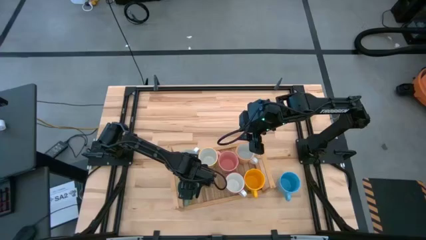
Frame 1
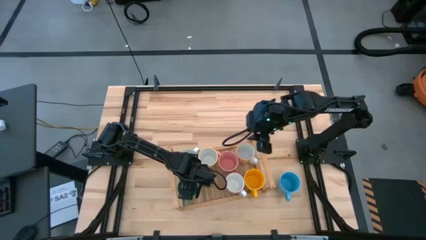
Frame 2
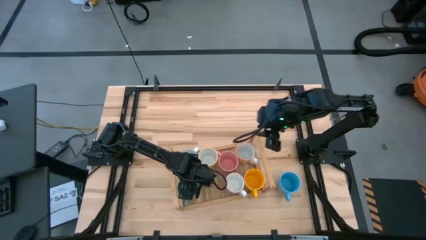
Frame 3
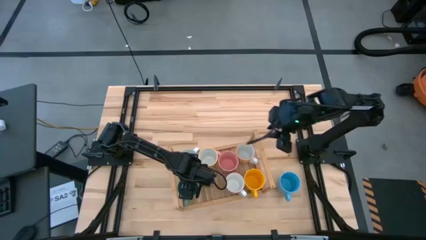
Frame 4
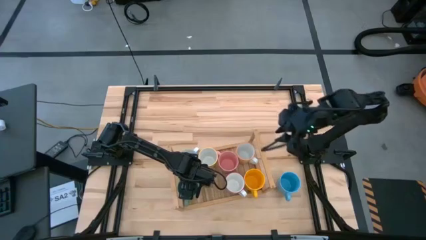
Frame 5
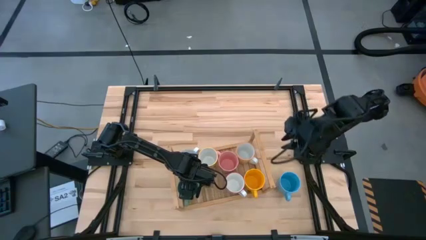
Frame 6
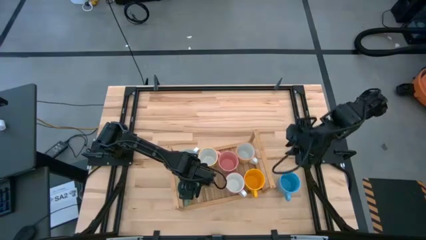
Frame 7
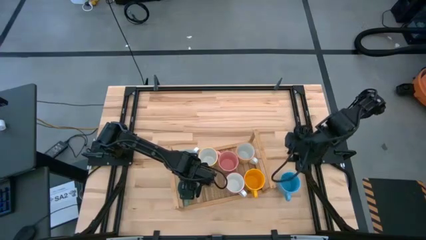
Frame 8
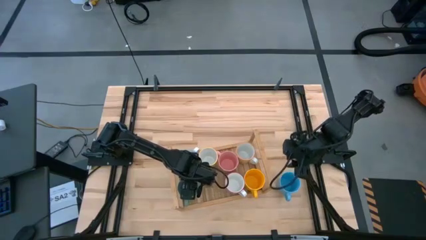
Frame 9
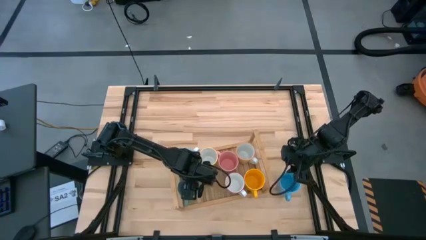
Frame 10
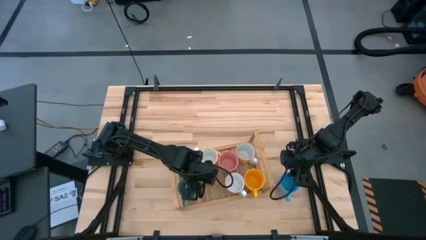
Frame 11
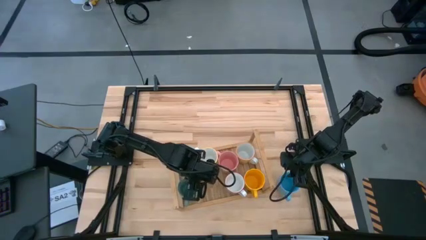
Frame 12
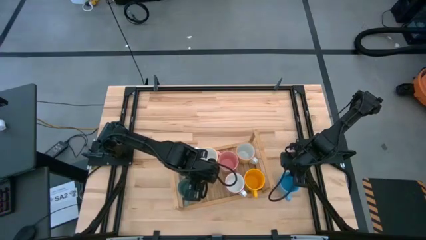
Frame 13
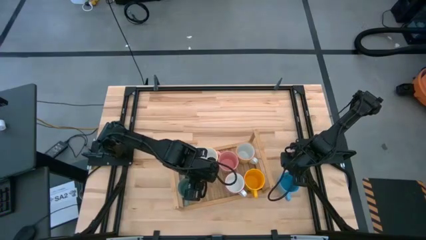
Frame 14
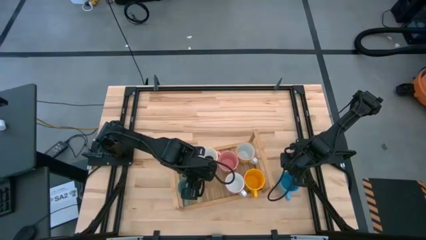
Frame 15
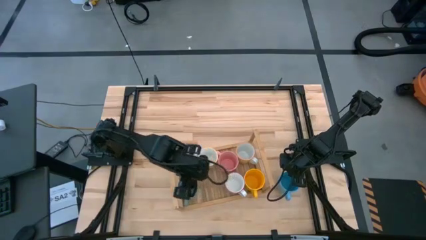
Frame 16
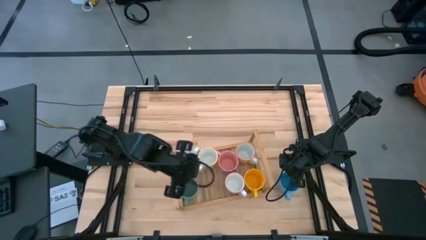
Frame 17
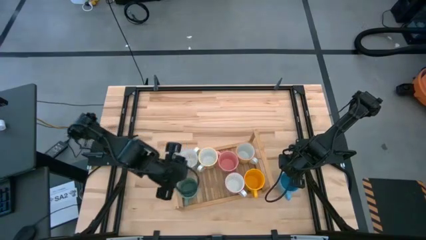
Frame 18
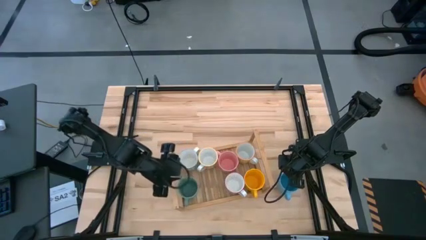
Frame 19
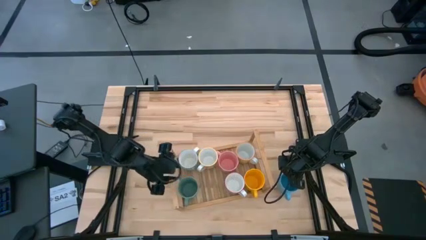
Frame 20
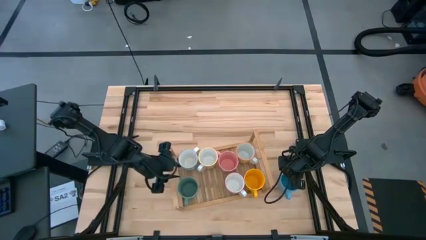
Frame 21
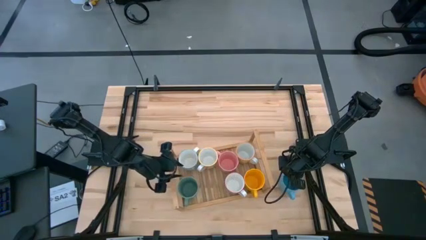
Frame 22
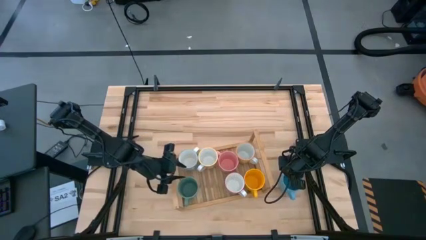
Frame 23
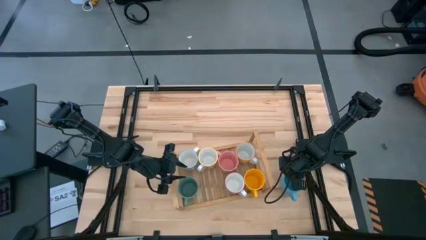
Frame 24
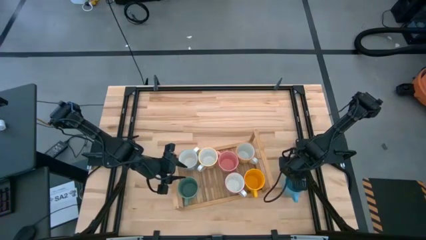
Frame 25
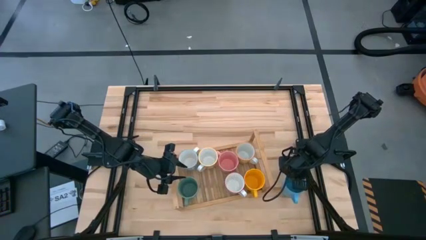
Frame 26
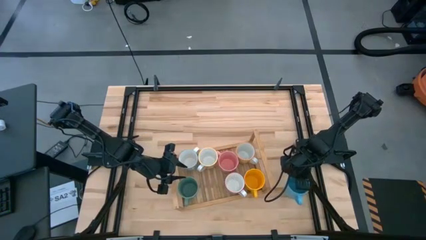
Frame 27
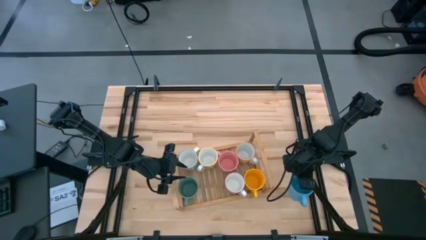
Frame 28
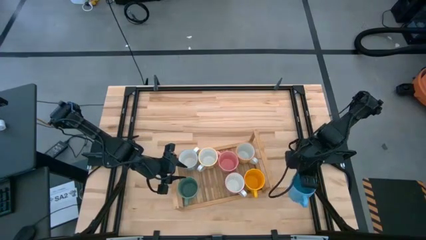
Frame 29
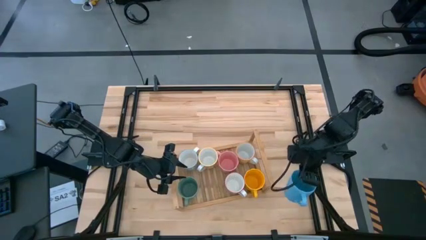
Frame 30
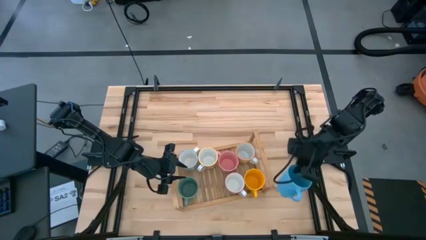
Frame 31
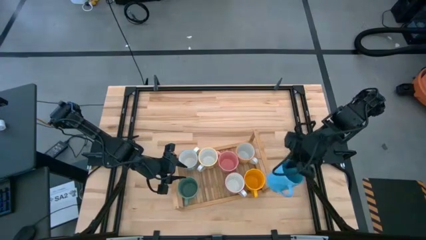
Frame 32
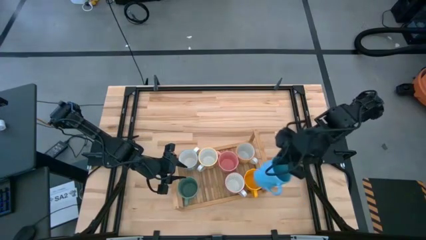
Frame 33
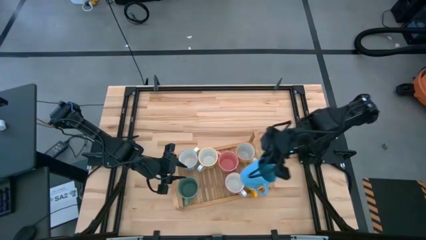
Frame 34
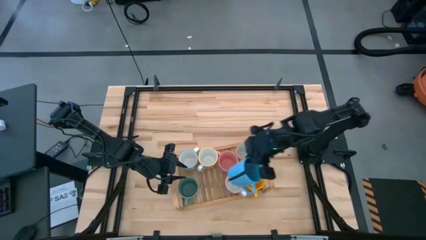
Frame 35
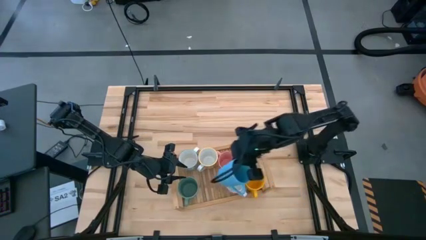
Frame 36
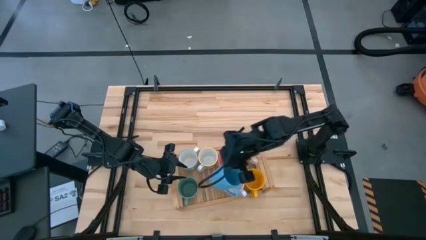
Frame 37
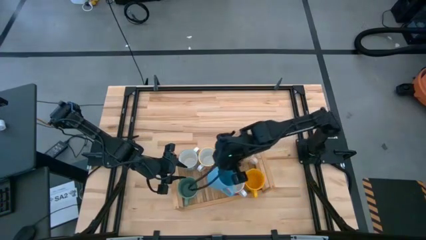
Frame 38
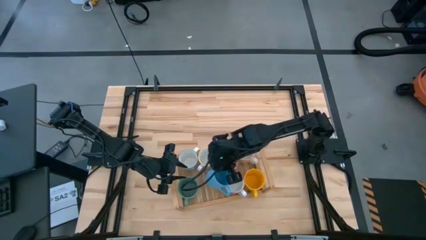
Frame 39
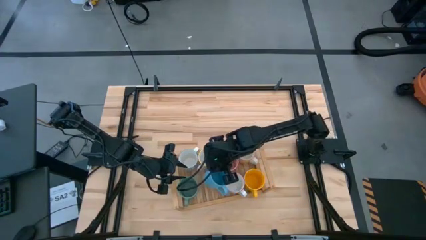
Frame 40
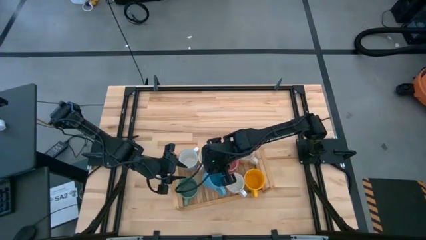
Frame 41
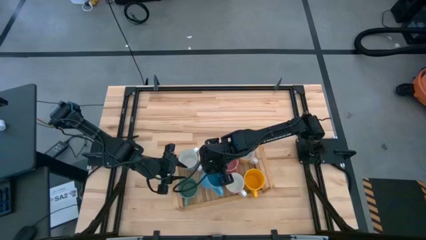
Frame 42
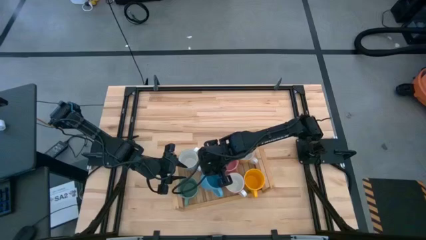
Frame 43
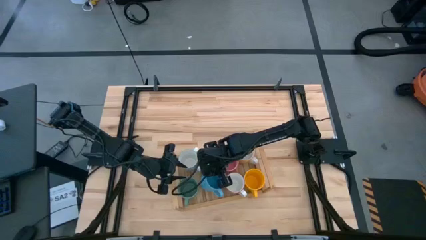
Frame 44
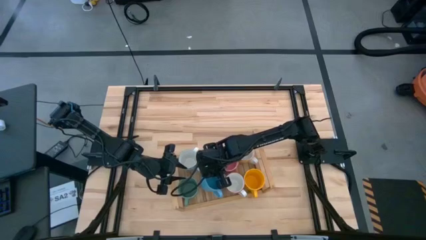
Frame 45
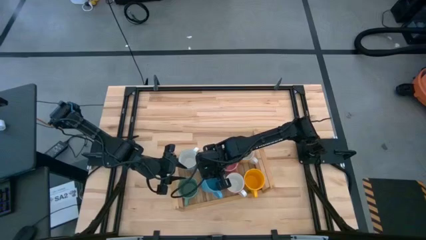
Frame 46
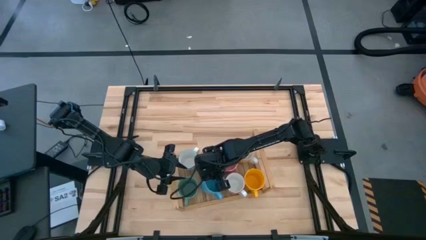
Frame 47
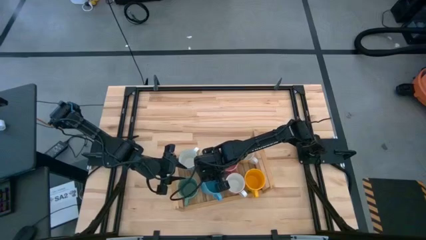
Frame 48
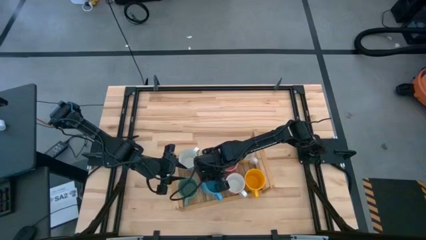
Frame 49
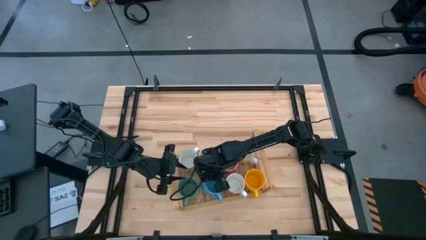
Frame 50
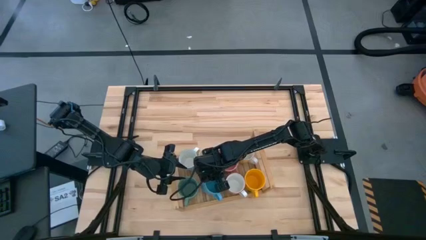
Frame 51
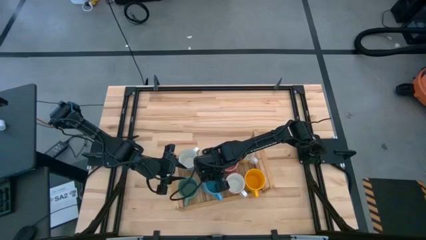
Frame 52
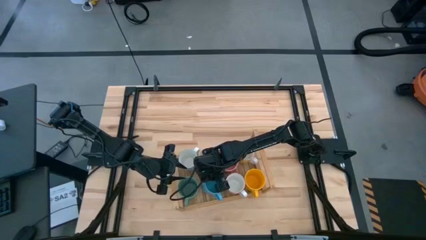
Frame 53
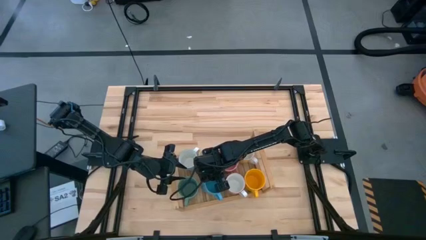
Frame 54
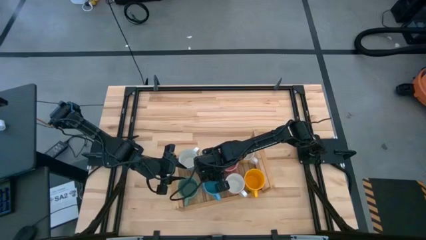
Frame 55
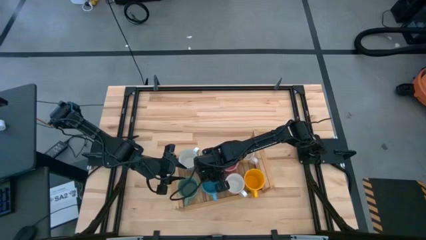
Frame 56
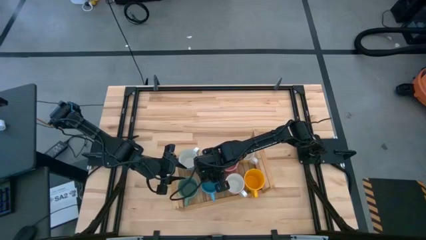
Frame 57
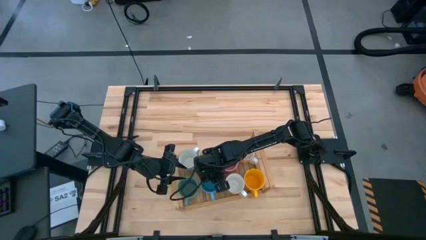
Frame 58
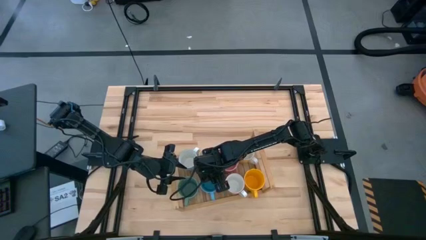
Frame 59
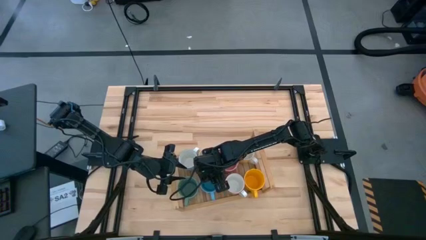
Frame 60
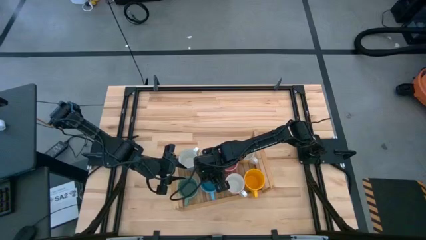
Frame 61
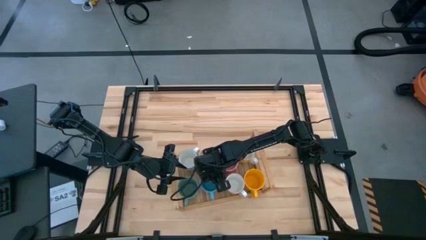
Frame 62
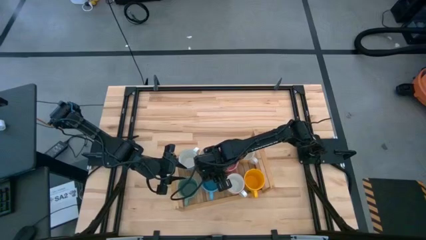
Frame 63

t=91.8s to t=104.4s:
Task: Place coffee mugs
Put the blue mug on the shelf

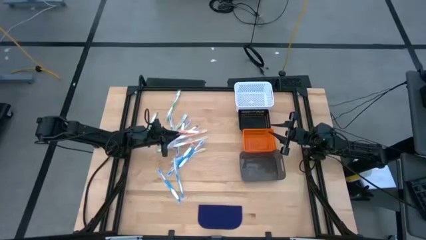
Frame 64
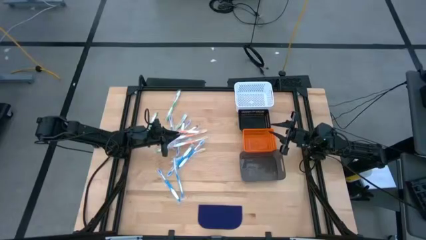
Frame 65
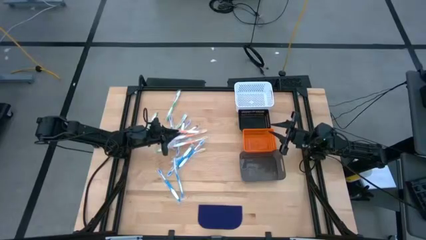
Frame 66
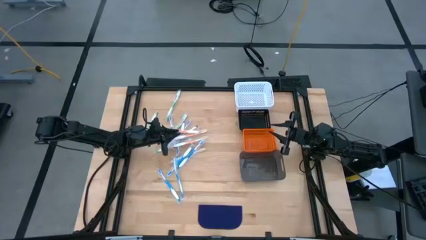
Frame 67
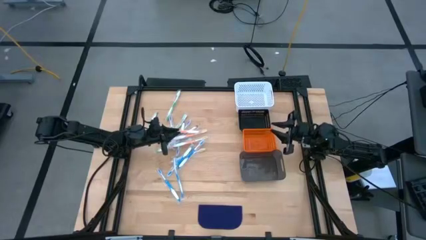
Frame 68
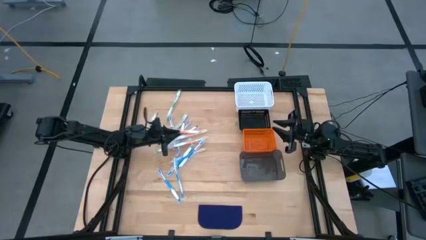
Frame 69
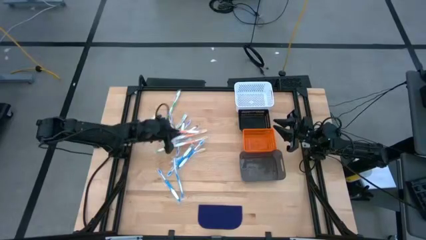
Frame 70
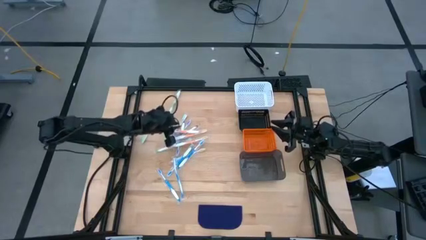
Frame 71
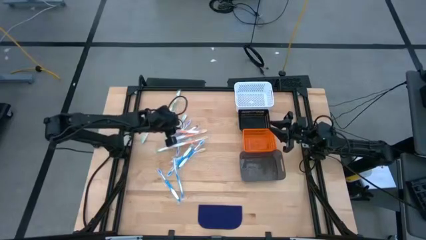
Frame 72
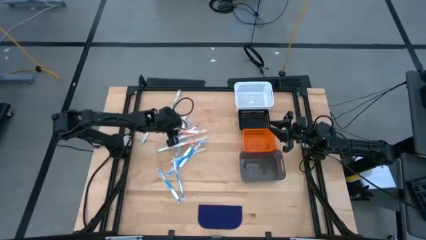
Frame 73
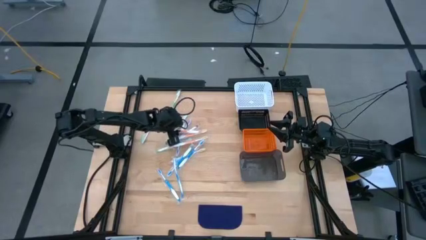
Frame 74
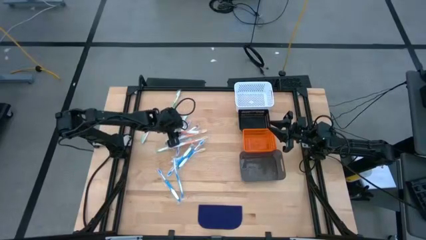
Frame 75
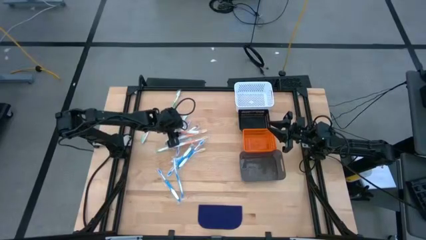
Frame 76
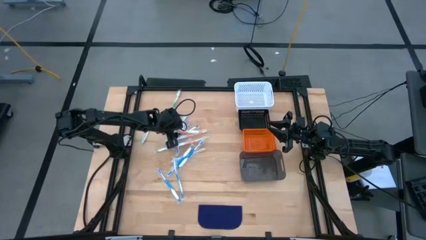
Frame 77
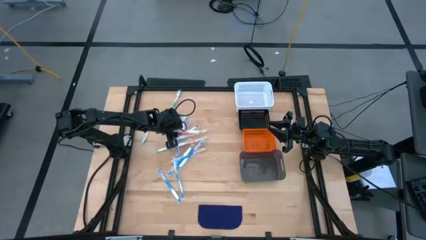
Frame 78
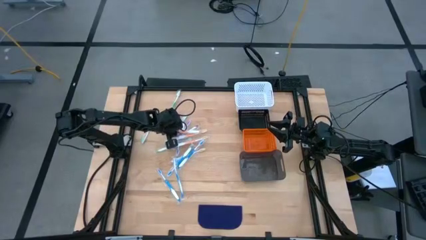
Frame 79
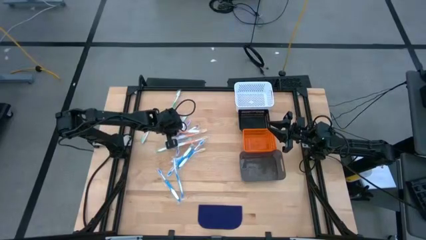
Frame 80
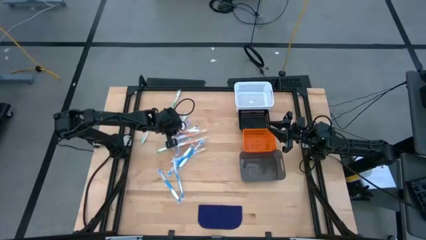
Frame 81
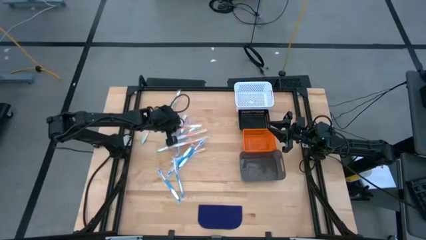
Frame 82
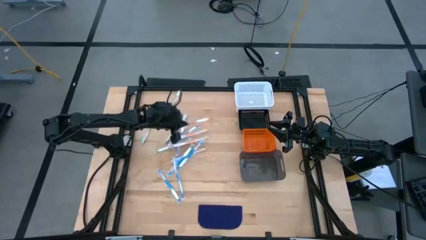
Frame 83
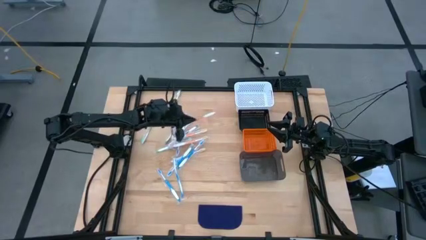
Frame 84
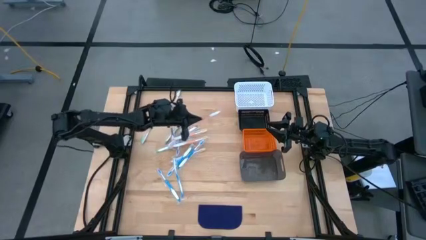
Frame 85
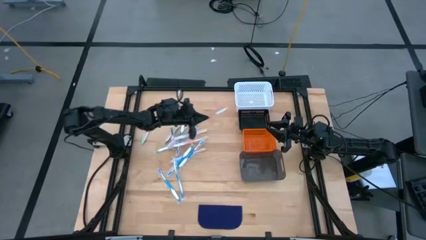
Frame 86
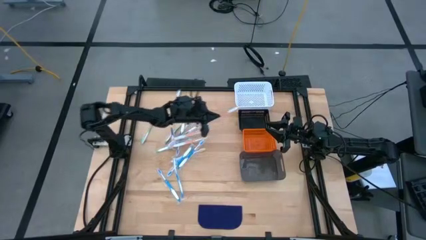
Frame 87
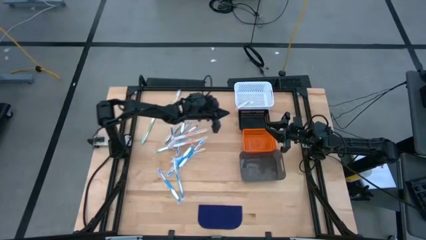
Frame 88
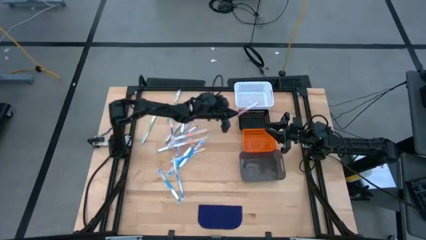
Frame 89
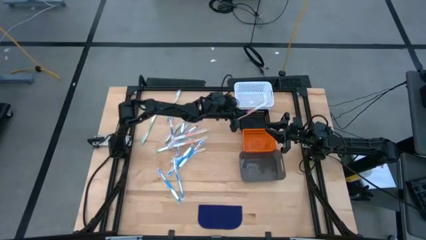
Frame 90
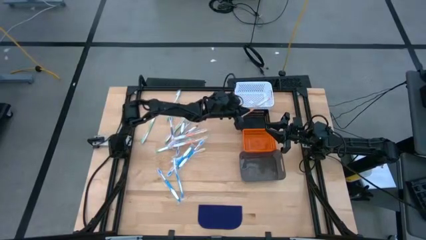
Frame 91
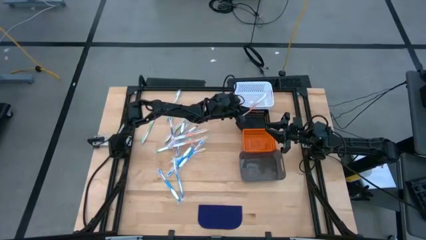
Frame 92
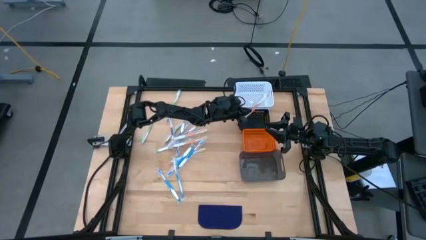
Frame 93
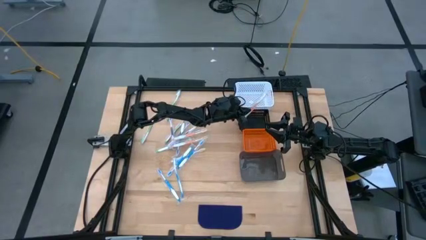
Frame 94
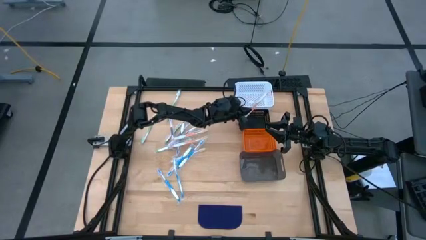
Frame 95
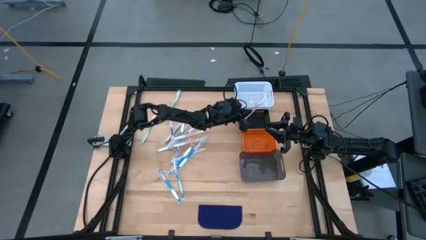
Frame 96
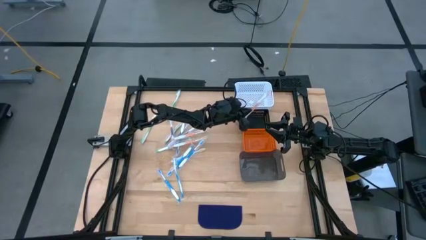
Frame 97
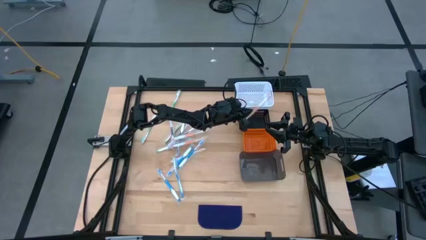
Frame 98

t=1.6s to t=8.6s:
Task: Pick & Place Toothbrushes
Put the orange toothbrush into the black bin
